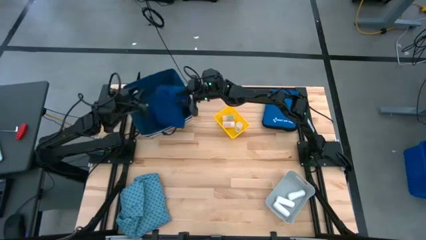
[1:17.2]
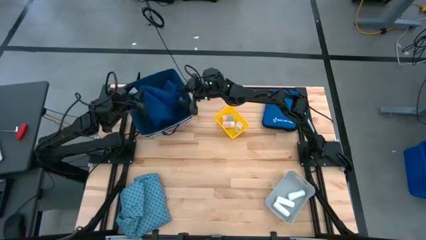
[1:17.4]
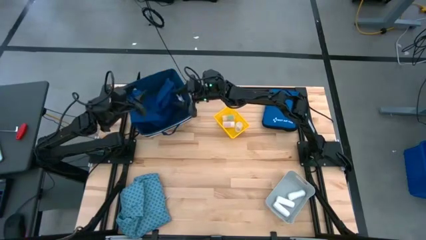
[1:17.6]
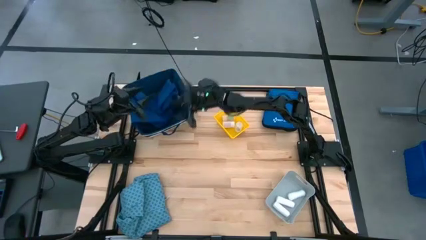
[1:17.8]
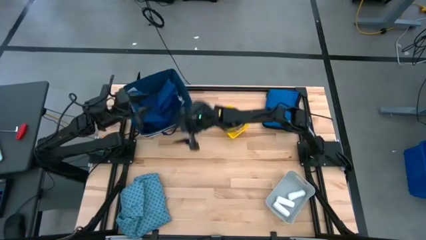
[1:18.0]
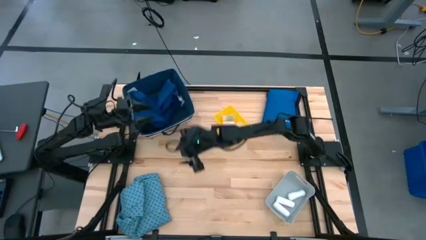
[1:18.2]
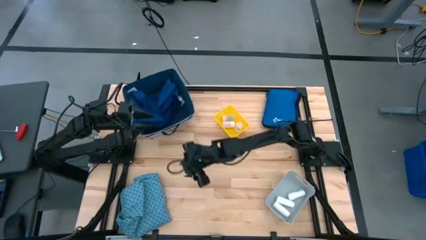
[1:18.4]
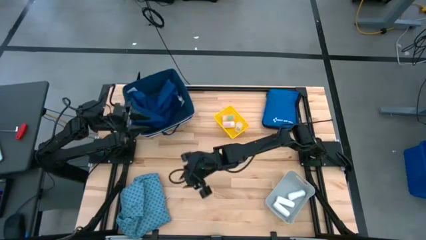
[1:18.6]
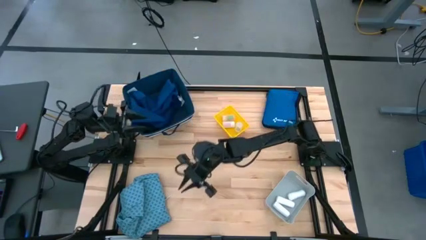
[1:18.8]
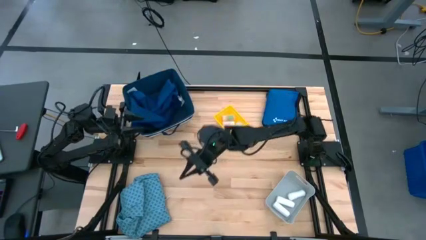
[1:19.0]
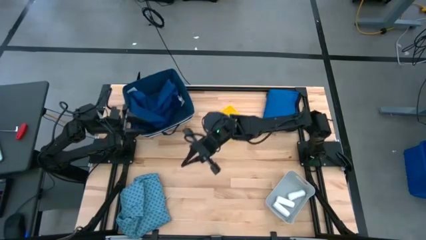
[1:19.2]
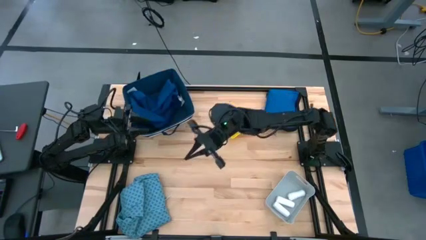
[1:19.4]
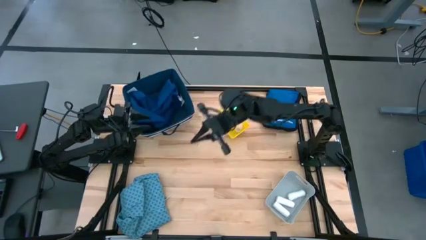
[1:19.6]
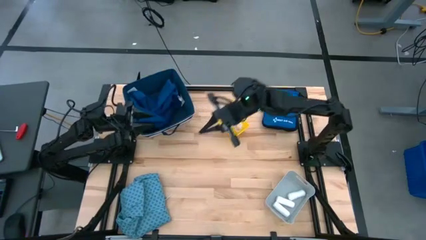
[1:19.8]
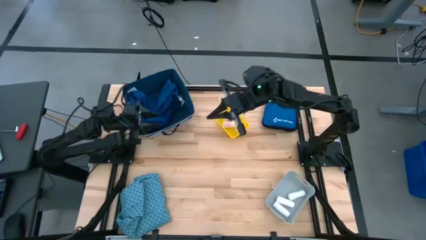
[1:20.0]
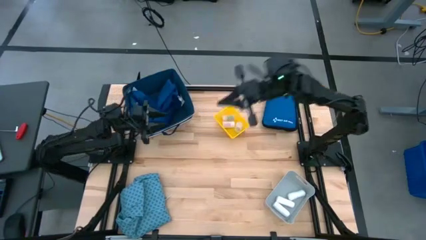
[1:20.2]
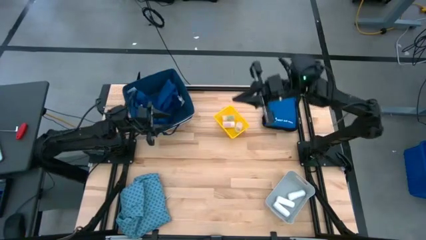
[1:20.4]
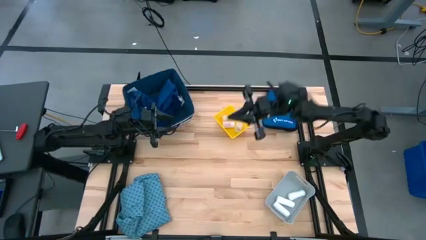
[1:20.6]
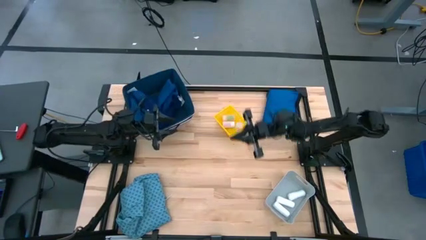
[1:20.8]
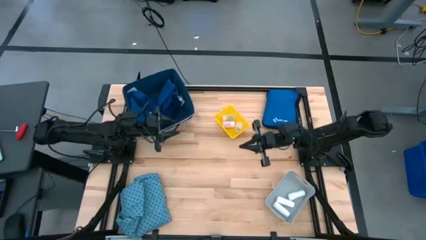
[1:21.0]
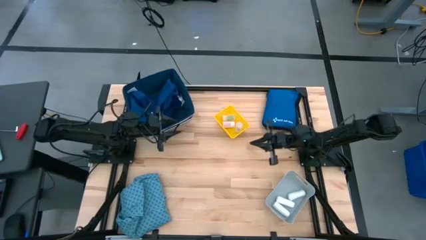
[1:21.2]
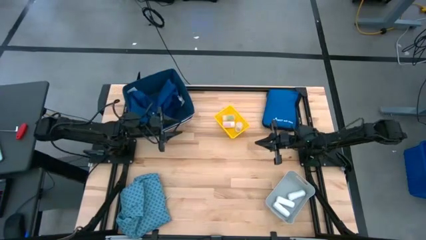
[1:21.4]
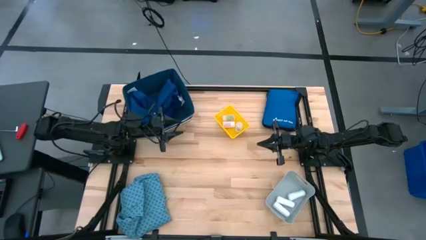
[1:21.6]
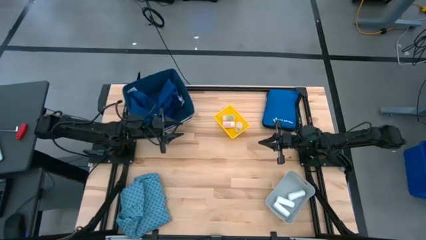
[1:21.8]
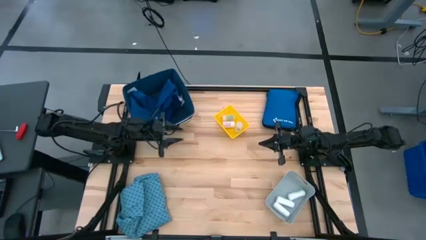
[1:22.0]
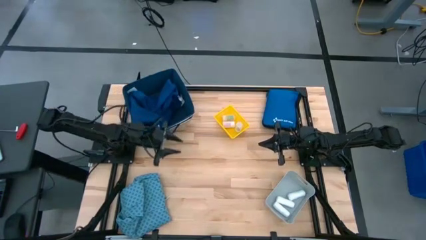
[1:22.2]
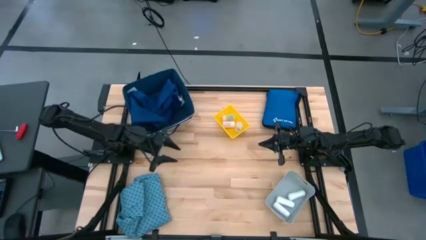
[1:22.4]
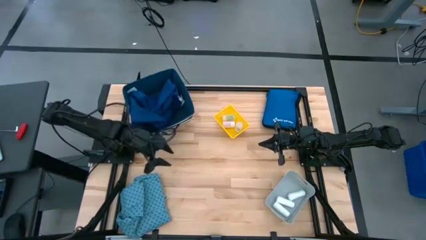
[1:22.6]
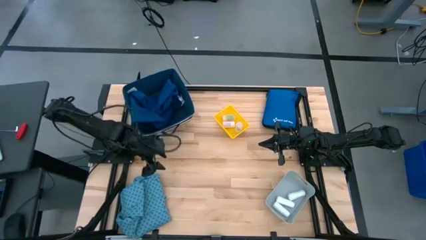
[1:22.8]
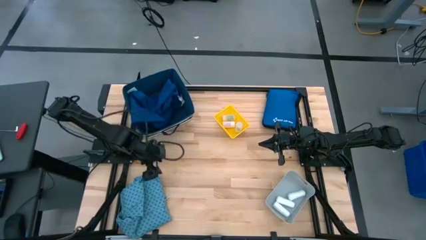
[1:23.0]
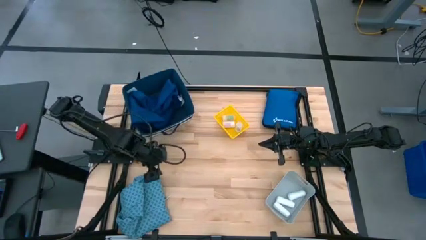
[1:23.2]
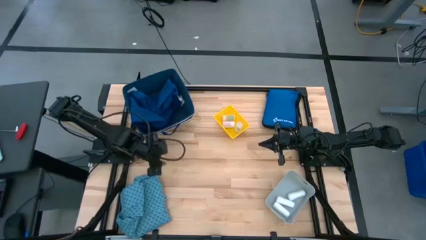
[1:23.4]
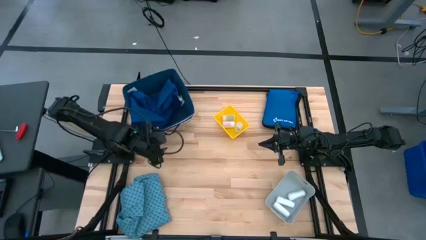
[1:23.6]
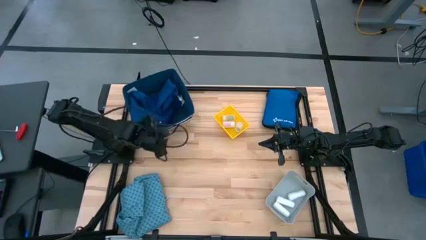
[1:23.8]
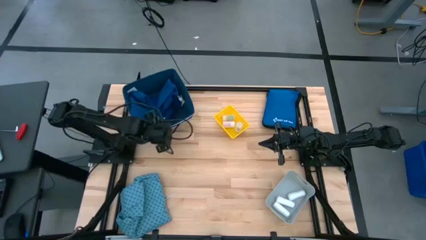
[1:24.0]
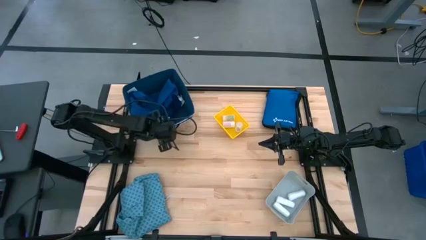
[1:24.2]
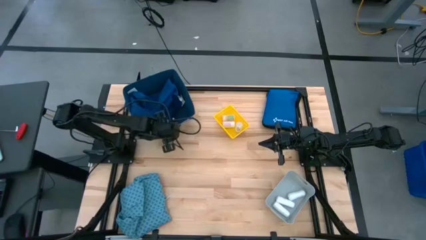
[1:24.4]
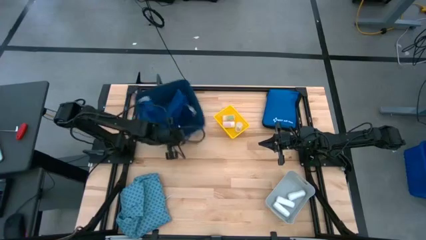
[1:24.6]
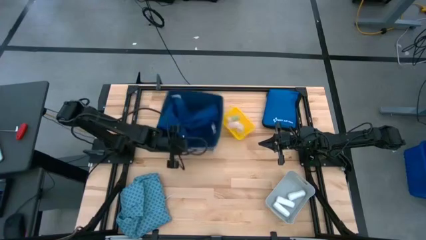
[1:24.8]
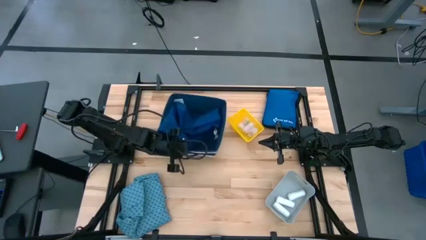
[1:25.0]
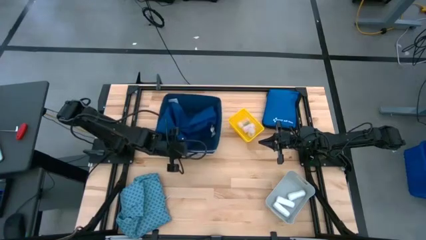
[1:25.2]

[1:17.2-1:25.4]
Task: Pick & place medical supplies in basket/bin
Adjust the blue bin

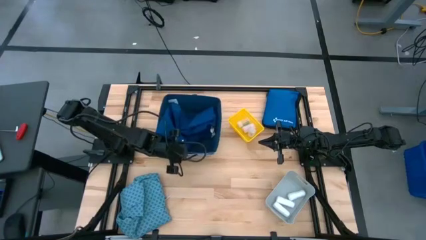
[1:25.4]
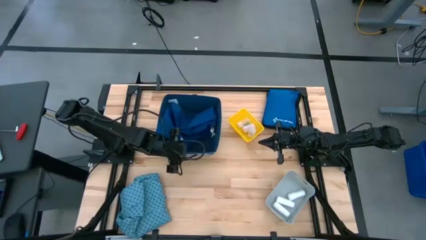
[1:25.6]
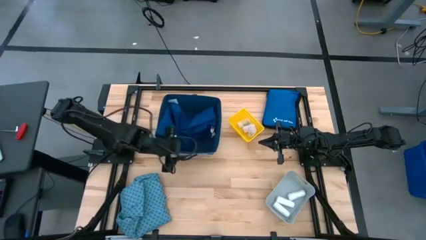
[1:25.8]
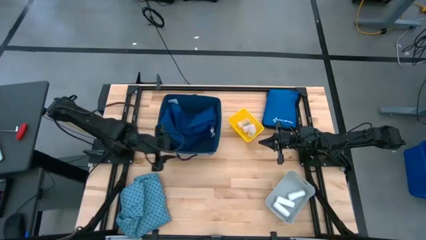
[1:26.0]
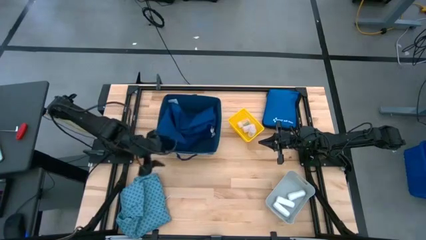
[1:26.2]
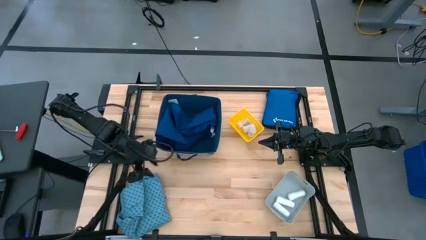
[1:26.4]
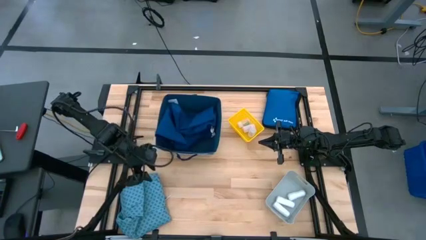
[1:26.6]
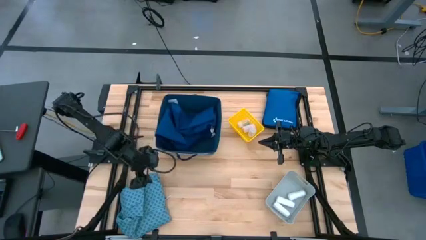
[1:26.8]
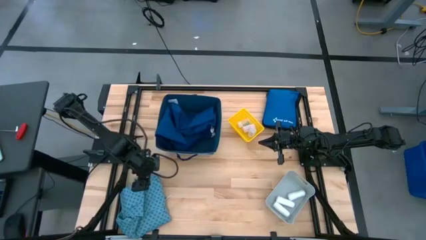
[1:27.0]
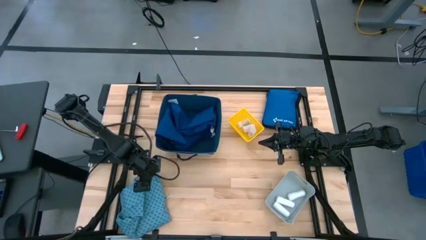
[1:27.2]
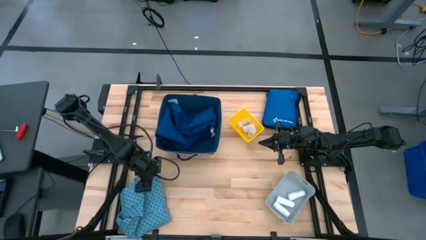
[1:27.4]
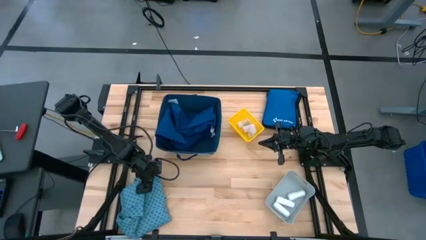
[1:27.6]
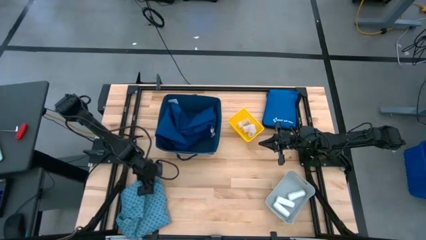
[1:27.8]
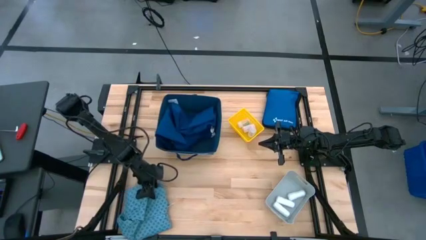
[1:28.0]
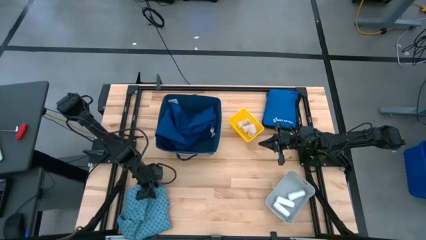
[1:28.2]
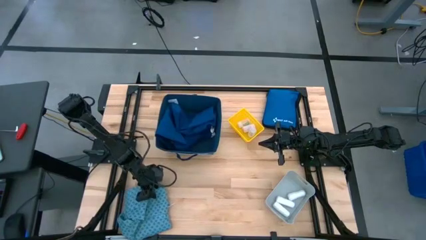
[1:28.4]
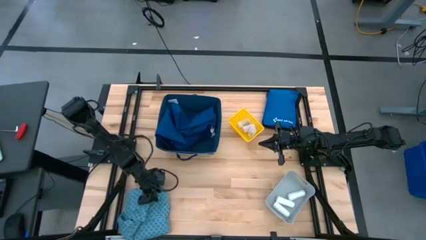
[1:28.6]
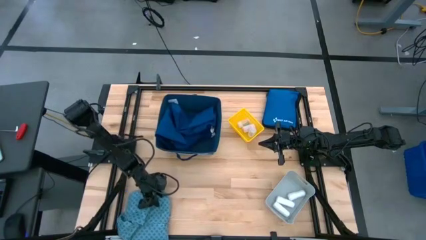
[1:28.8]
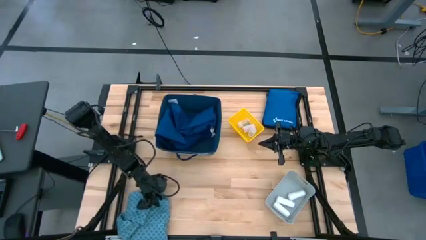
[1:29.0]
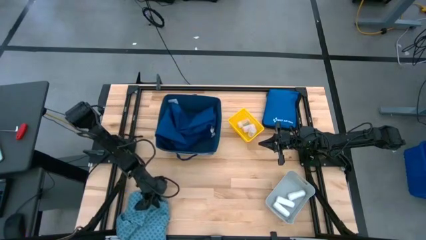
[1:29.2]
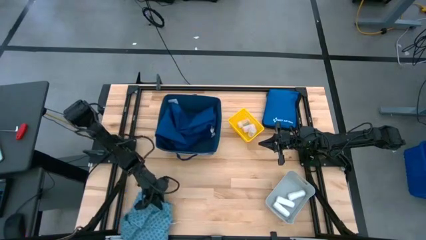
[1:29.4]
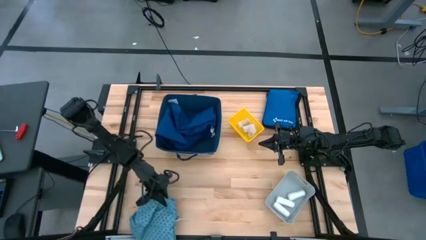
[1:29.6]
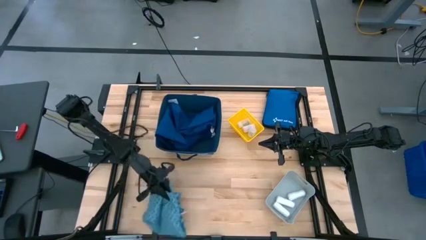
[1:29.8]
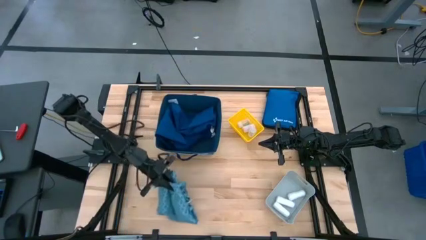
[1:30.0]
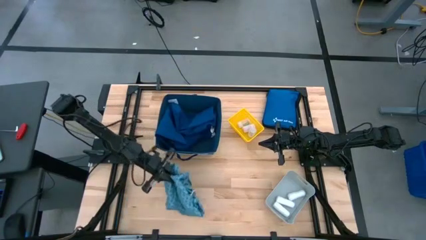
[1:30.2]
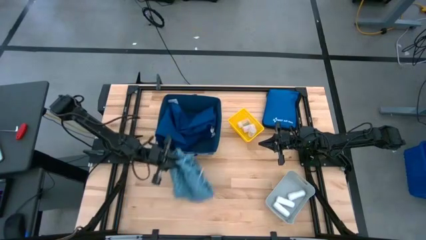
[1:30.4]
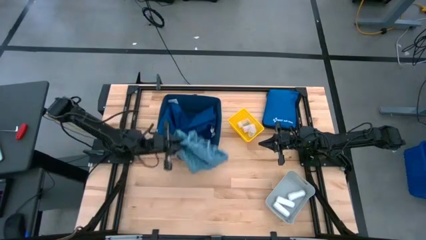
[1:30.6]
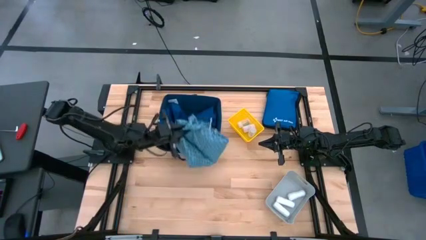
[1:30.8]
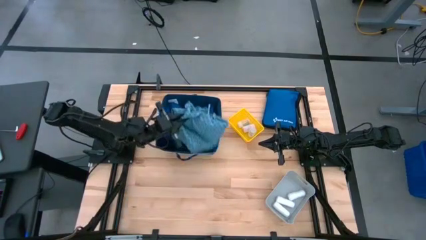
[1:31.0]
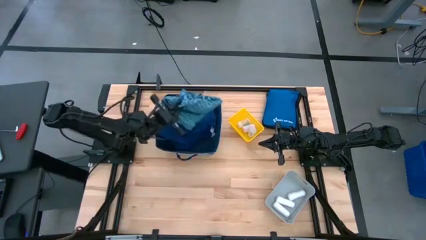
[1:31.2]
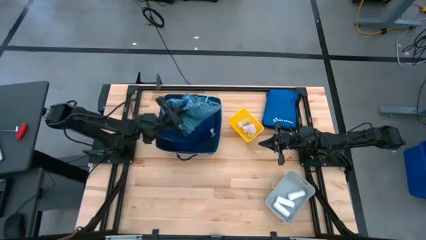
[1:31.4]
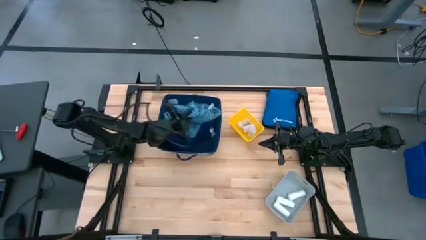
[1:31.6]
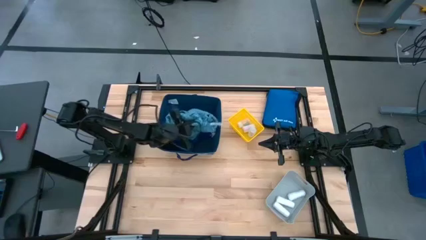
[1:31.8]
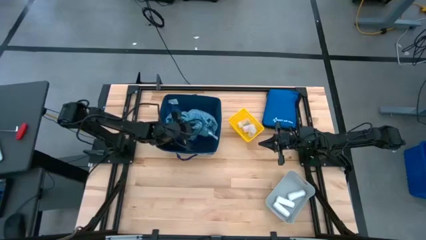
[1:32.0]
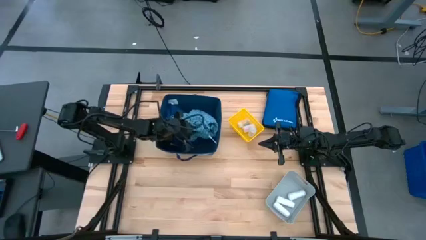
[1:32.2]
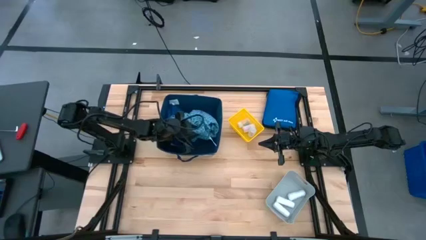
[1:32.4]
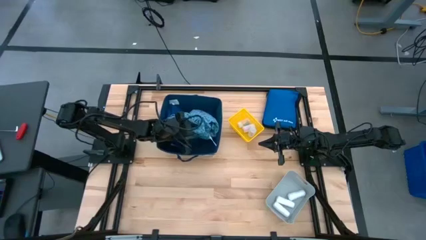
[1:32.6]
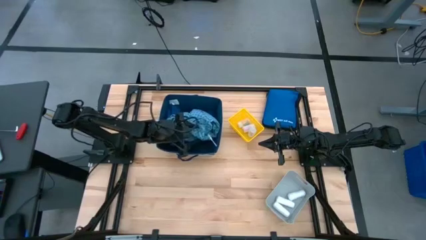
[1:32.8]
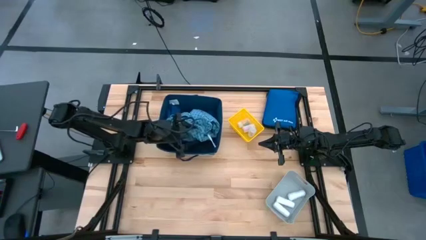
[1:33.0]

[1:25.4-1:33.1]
Put the light blue patient gown into the blue bin

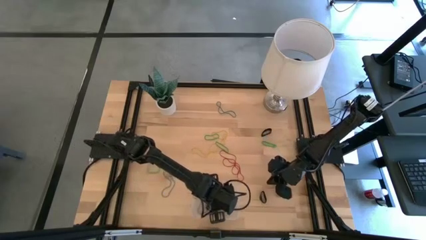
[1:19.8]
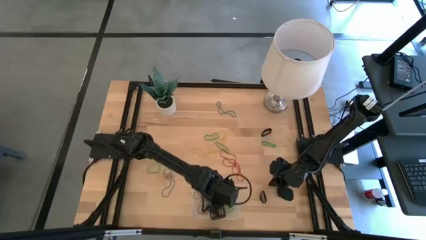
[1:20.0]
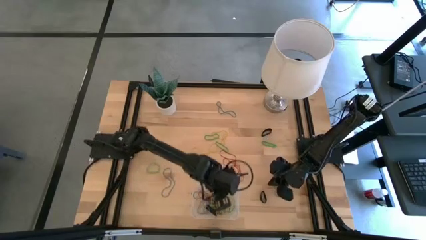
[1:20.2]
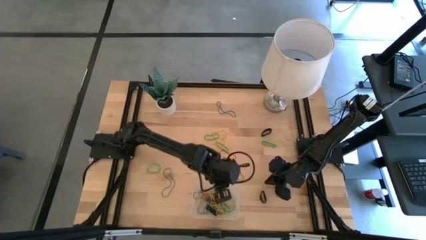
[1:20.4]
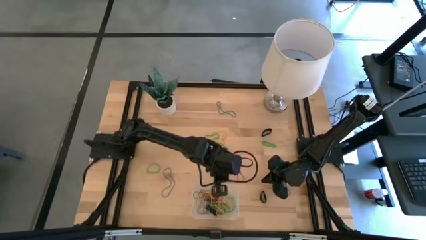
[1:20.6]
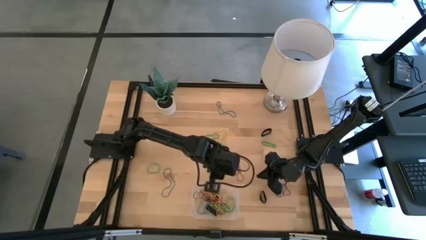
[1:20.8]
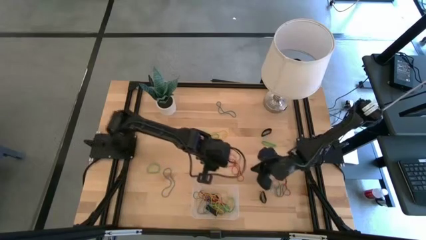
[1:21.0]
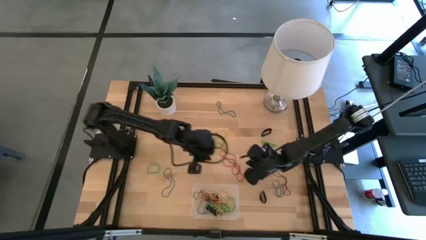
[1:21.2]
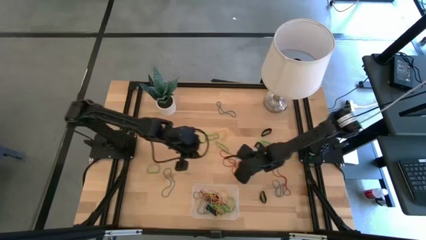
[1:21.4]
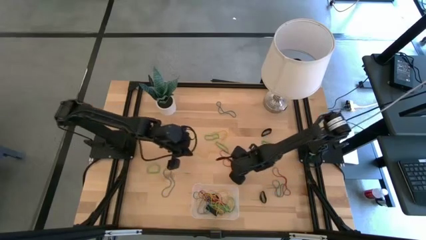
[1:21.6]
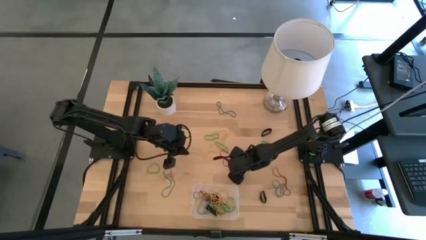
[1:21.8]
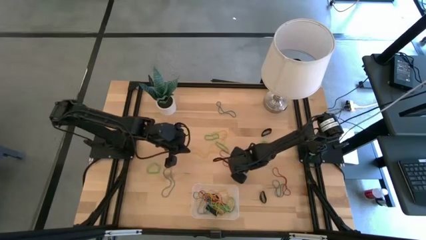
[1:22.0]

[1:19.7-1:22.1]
Task: Pick and place rubber bands into bin
Put the red rubber band into the transparent bin

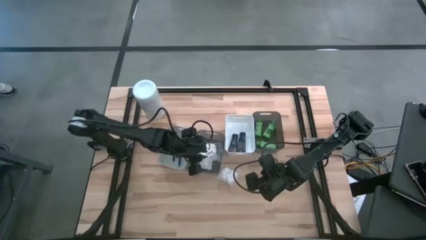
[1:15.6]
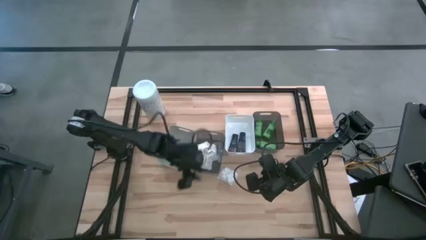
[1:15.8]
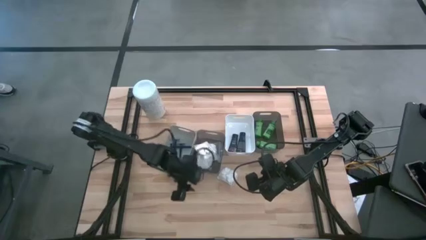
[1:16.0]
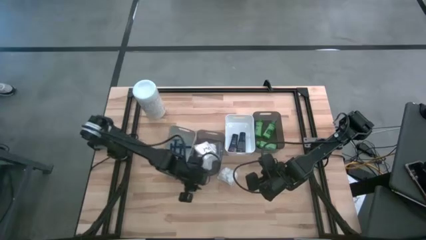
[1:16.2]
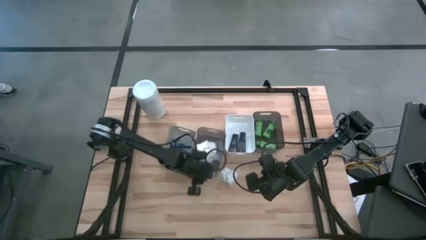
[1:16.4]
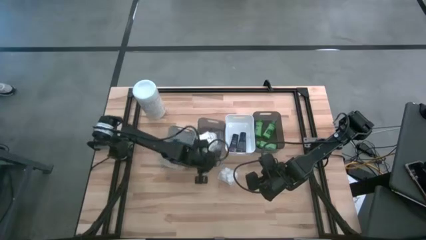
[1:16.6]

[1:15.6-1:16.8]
Task: Pick & Place Travel size toiletries
Adjust the left black bin
